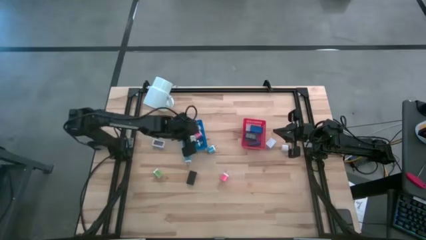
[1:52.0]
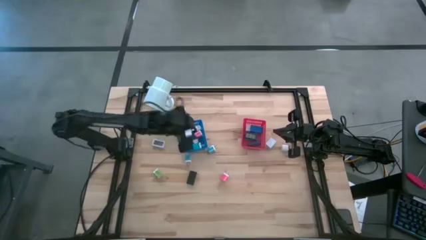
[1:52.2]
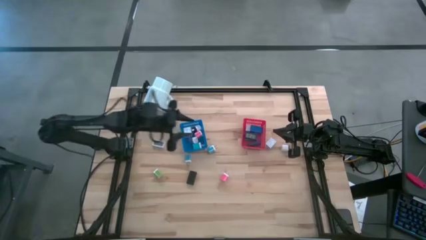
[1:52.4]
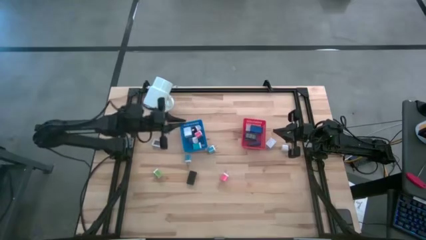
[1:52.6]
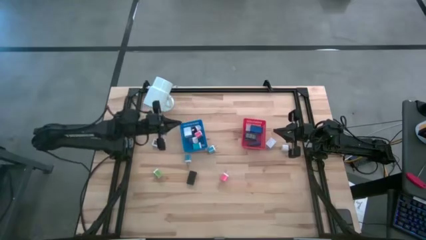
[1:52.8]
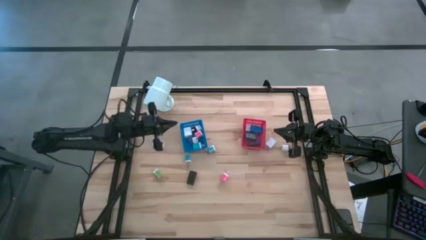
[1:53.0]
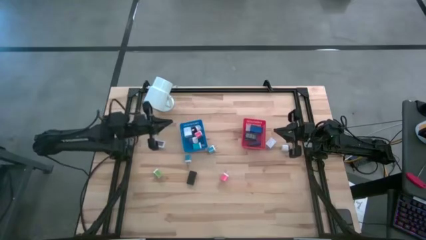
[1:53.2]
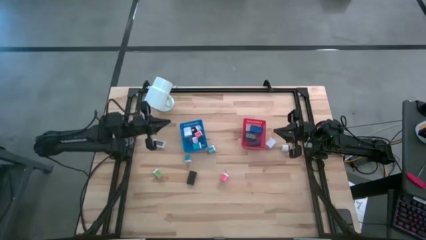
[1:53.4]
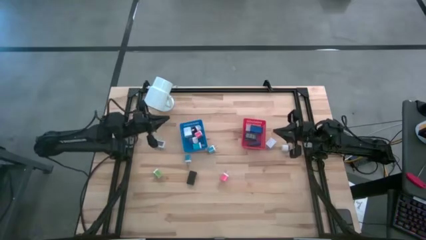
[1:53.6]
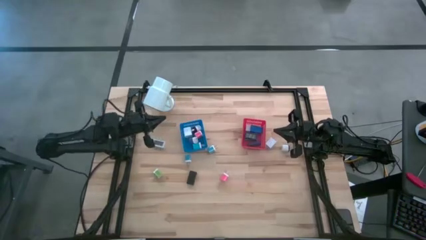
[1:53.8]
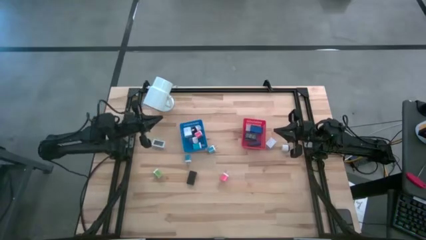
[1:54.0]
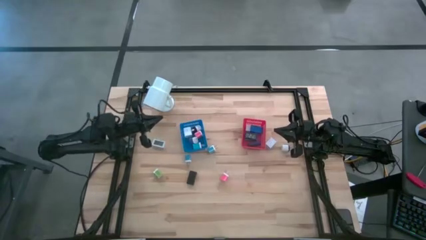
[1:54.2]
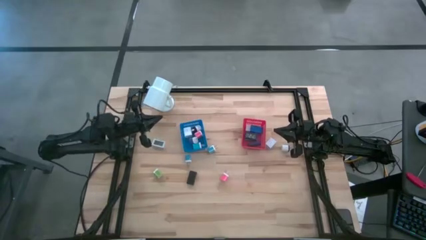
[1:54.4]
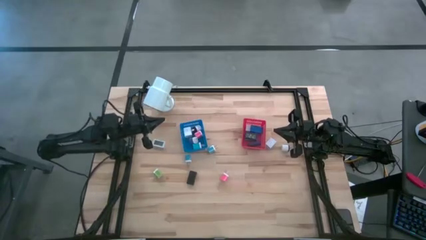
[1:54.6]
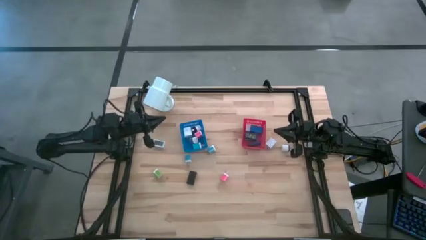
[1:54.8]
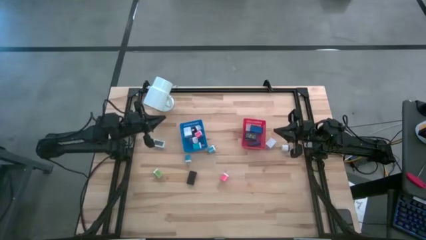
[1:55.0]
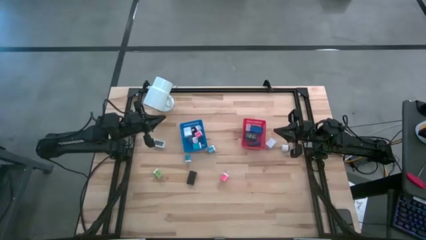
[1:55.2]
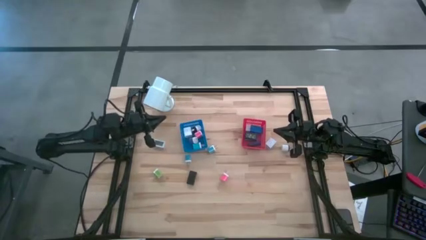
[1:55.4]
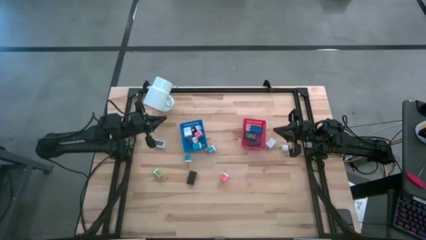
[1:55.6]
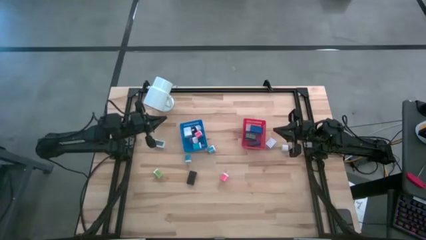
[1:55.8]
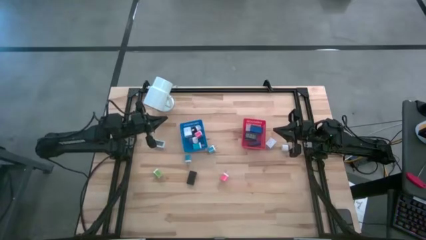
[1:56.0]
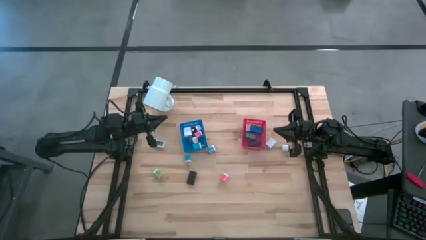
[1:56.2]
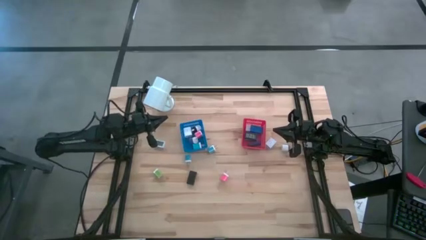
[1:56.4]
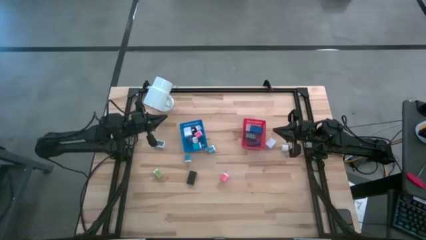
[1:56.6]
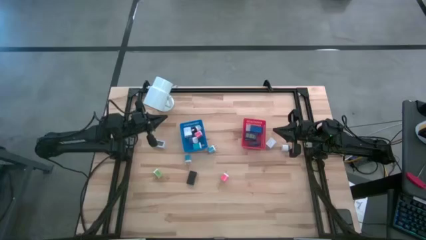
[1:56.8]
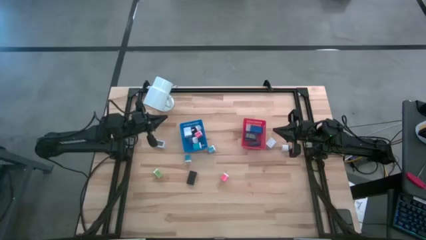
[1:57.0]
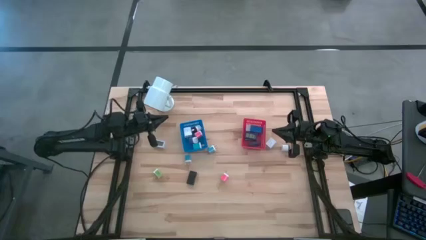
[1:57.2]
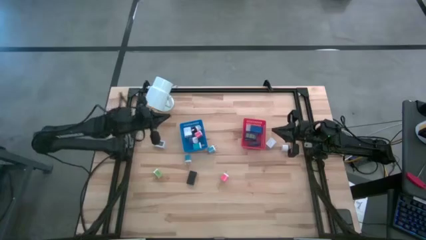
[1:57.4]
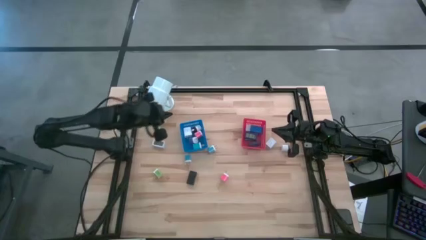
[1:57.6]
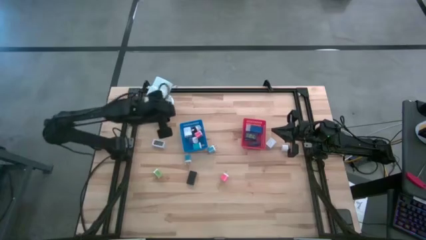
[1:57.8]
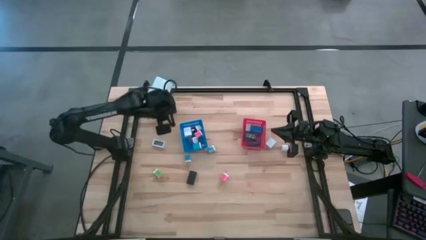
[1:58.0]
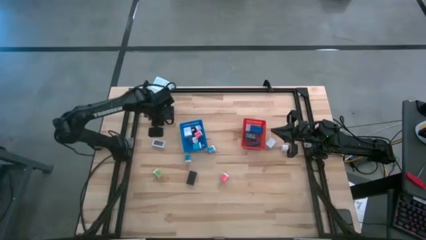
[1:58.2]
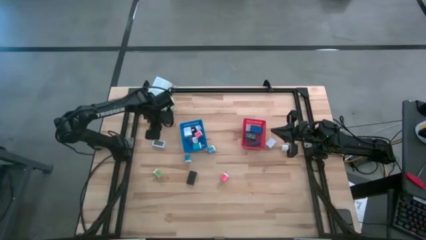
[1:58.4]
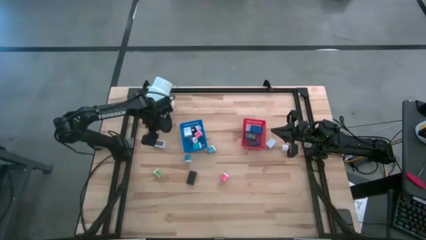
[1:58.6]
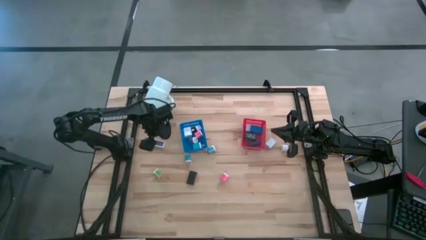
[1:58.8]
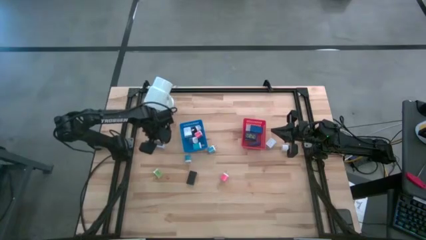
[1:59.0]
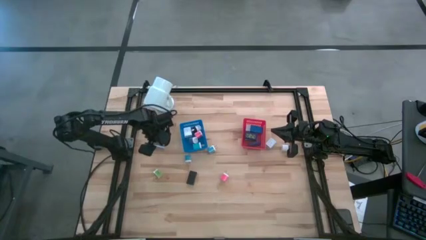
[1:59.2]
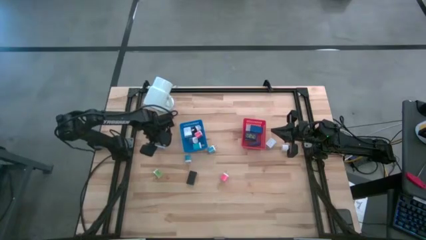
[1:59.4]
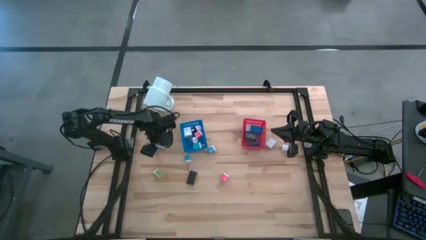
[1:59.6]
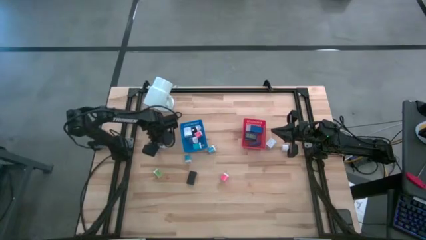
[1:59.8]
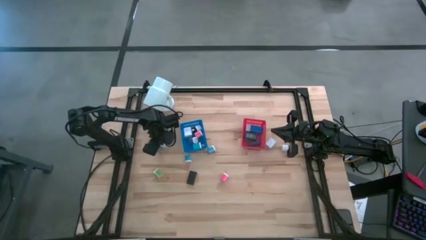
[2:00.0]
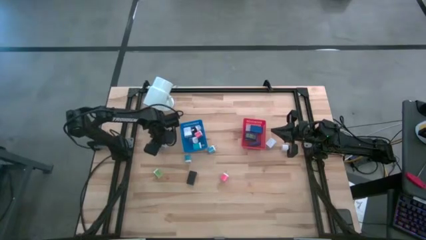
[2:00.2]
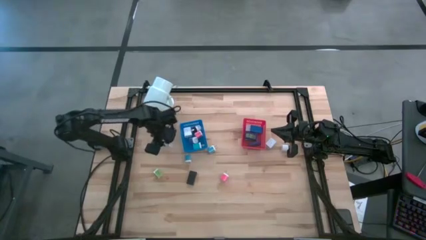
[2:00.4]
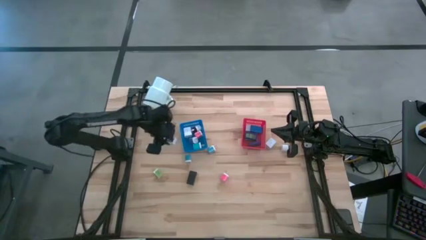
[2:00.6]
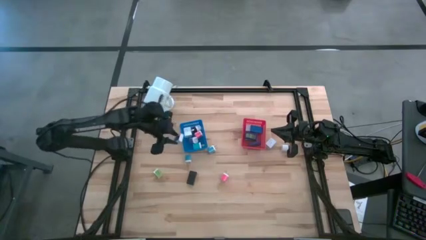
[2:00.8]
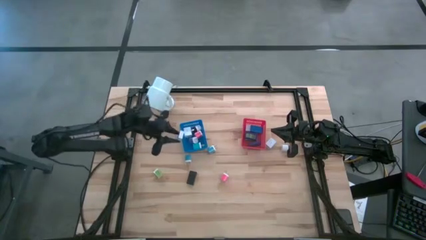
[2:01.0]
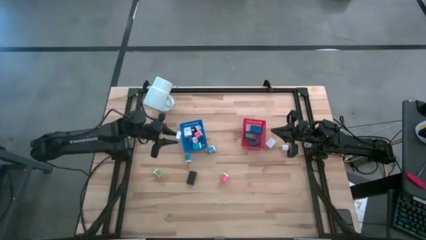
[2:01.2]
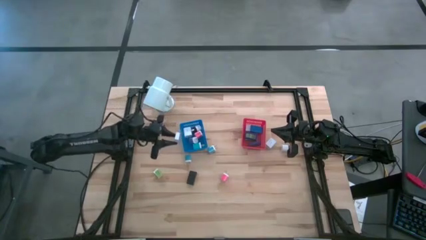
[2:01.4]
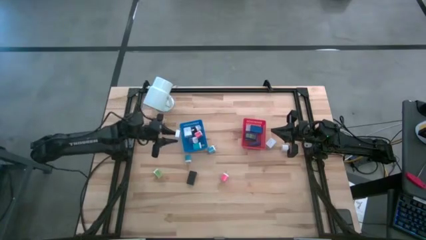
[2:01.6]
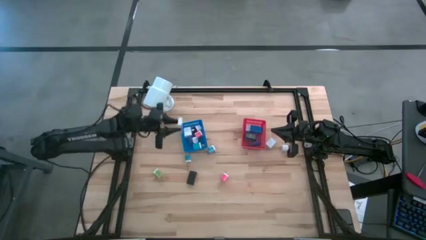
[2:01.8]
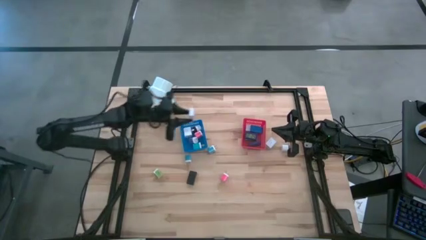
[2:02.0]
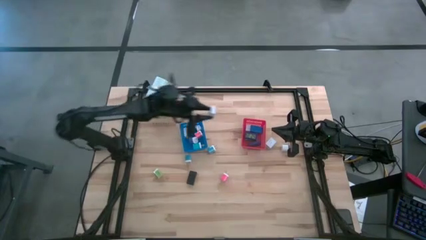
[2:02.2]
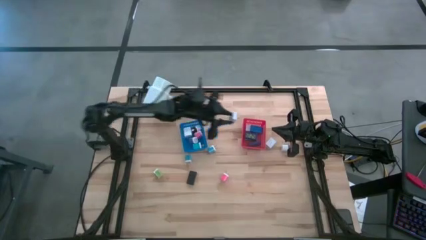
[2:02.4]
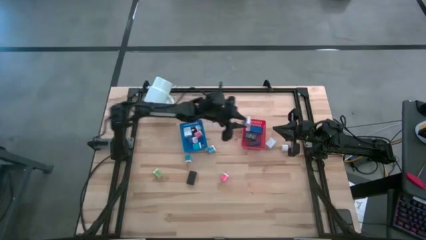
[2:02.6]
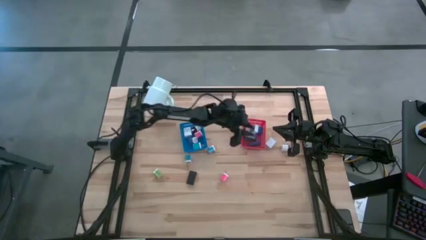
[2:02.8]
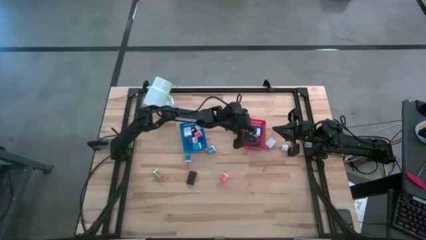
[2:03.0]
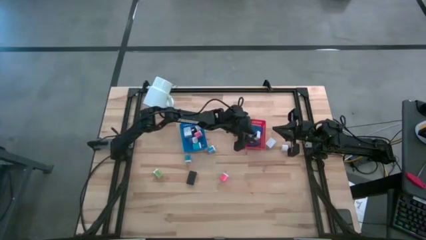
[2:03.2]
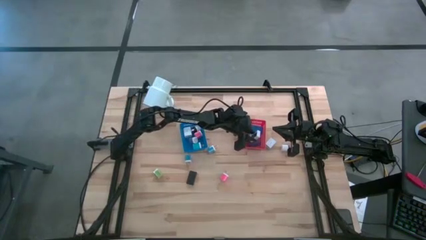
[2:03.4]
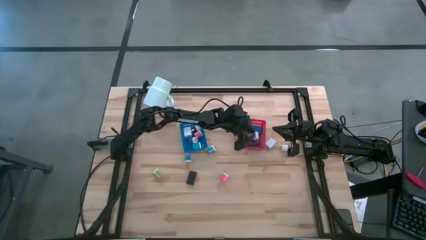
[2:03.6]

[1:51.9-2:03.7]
Task: Pick & Place Office items
Put the white digital clock into the red bin
